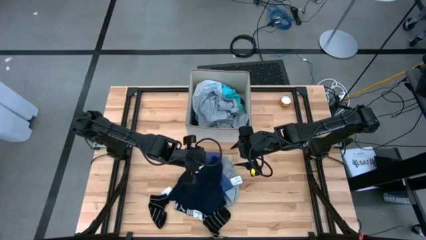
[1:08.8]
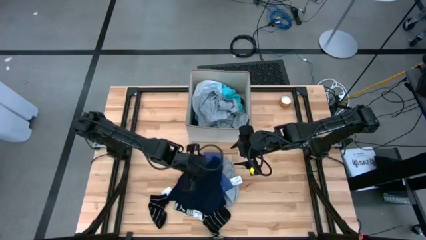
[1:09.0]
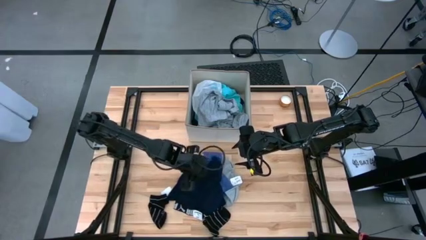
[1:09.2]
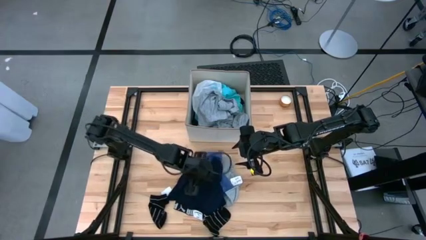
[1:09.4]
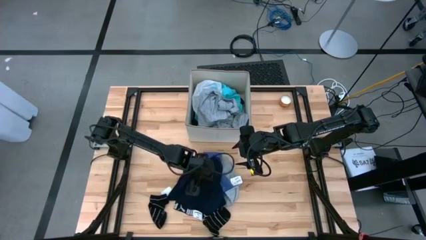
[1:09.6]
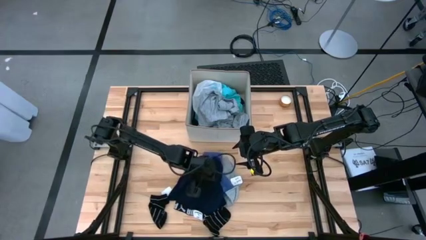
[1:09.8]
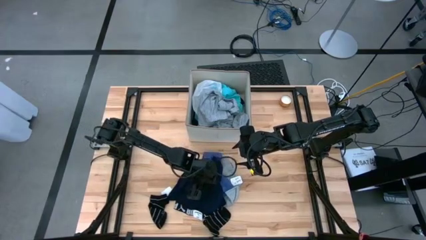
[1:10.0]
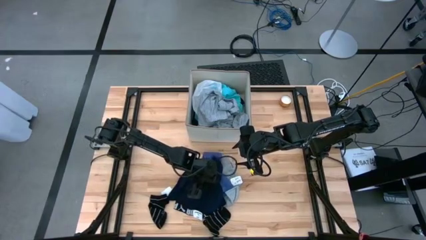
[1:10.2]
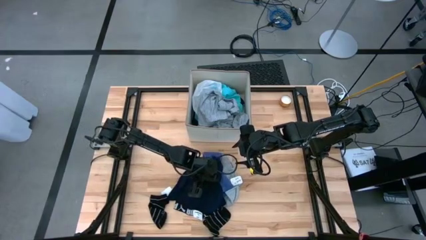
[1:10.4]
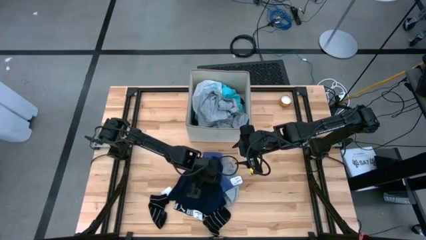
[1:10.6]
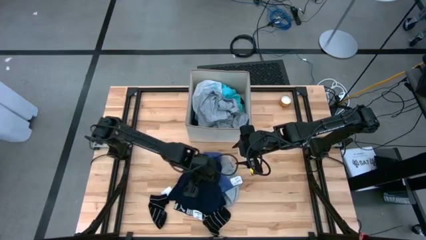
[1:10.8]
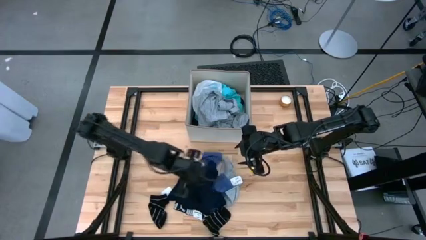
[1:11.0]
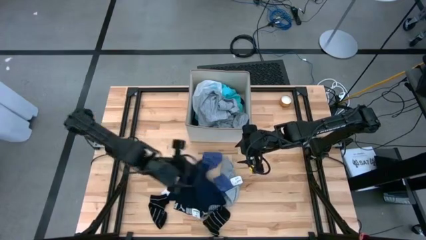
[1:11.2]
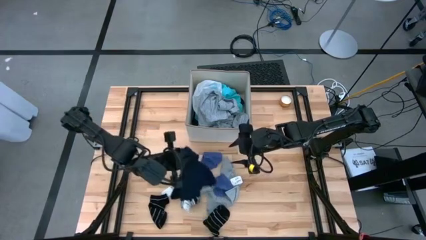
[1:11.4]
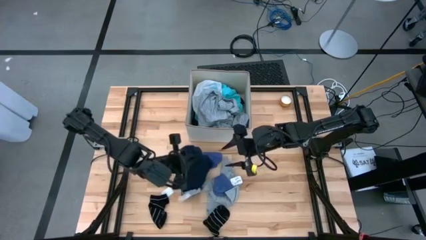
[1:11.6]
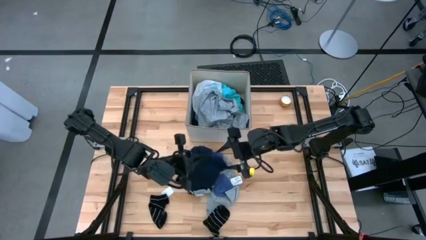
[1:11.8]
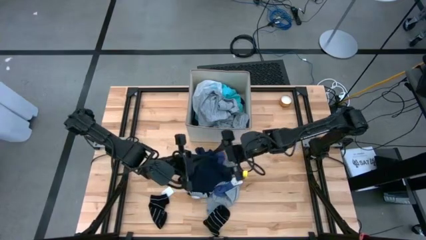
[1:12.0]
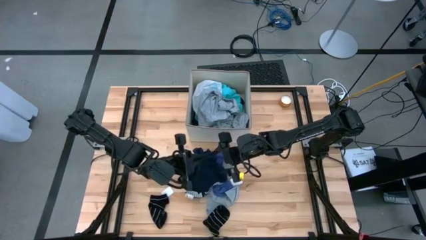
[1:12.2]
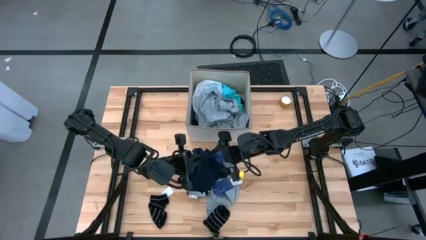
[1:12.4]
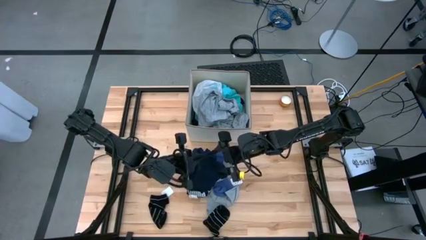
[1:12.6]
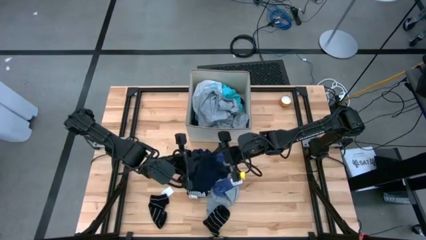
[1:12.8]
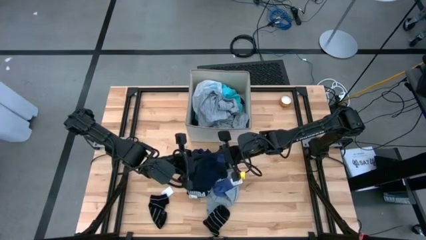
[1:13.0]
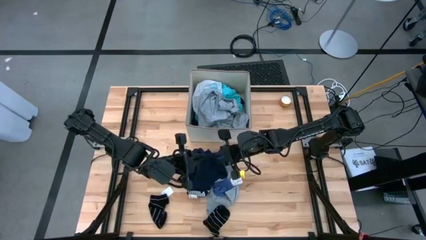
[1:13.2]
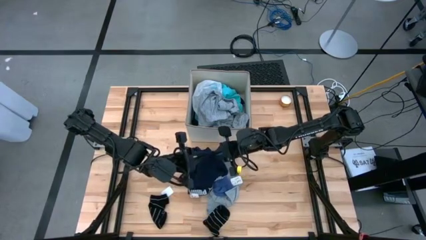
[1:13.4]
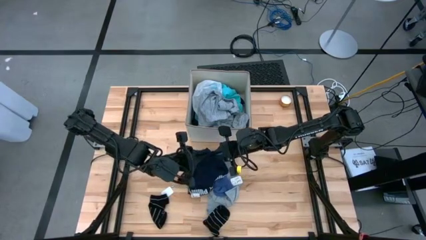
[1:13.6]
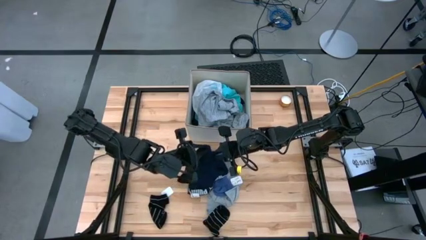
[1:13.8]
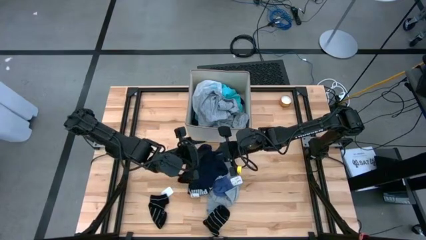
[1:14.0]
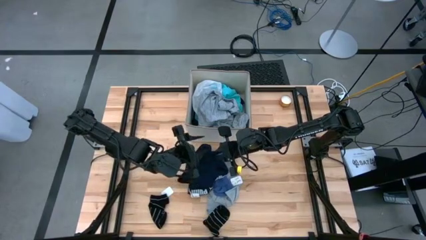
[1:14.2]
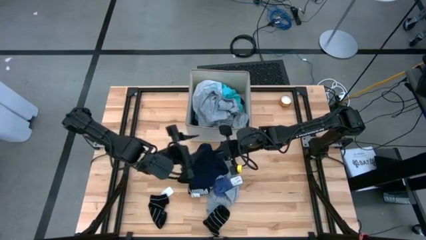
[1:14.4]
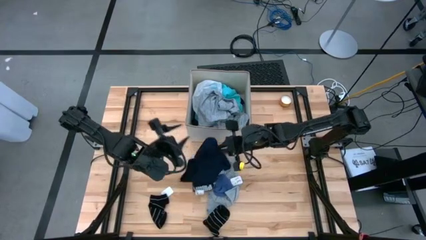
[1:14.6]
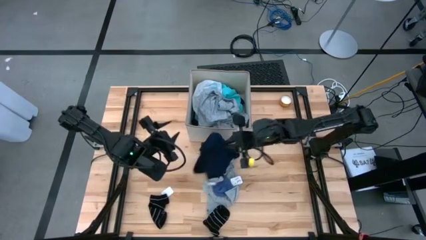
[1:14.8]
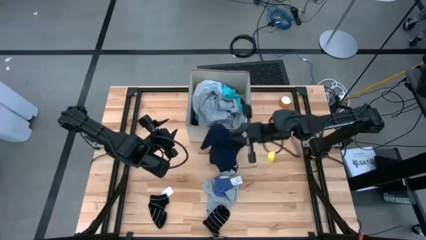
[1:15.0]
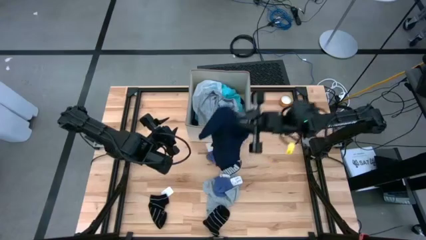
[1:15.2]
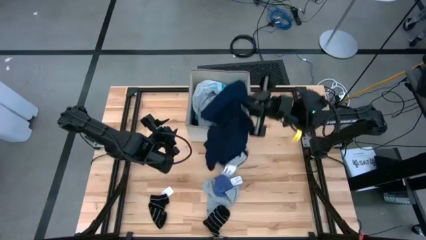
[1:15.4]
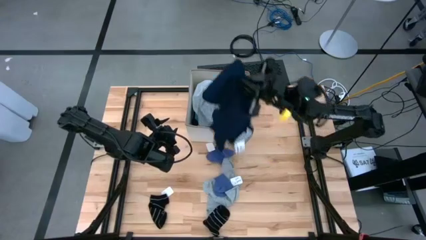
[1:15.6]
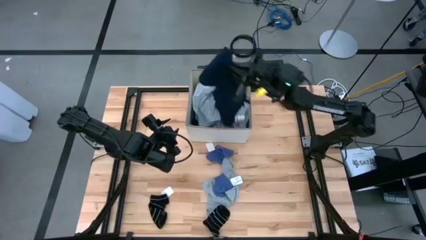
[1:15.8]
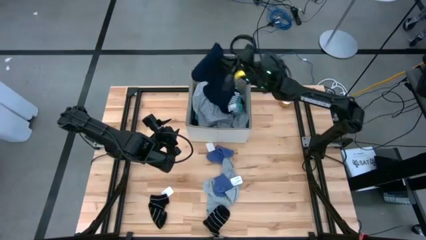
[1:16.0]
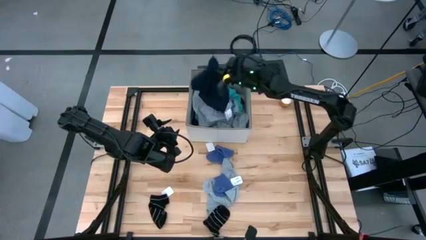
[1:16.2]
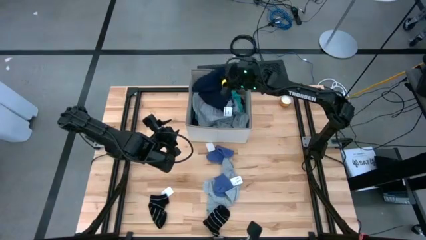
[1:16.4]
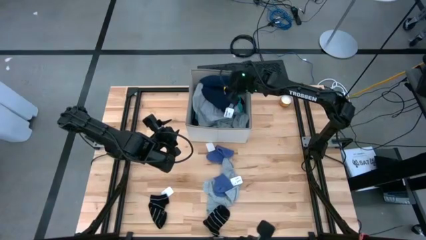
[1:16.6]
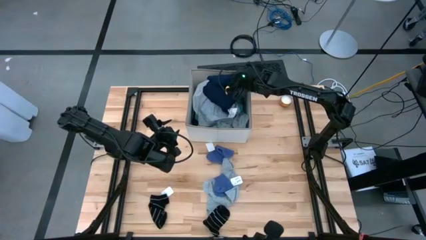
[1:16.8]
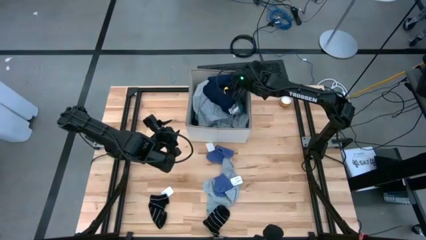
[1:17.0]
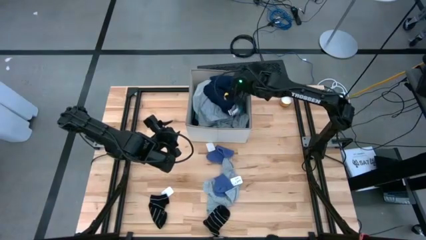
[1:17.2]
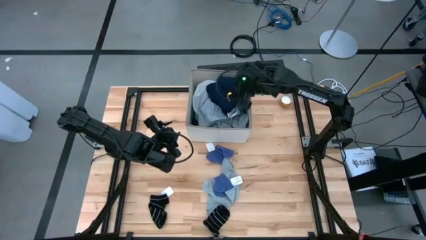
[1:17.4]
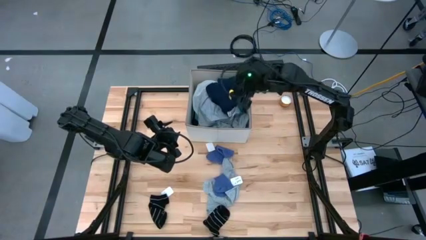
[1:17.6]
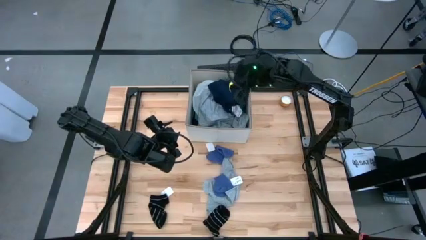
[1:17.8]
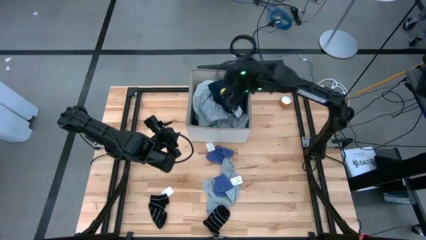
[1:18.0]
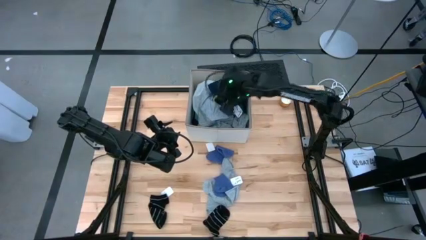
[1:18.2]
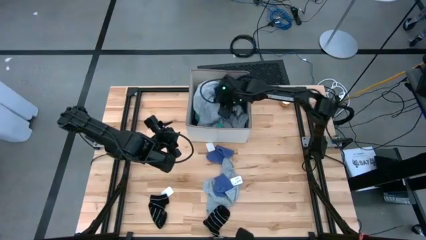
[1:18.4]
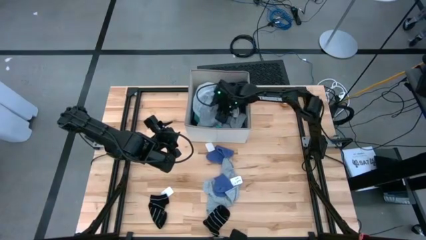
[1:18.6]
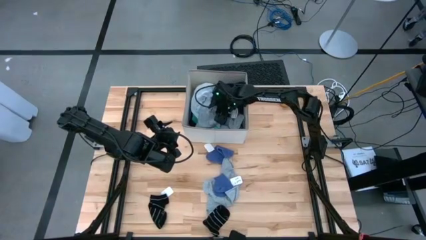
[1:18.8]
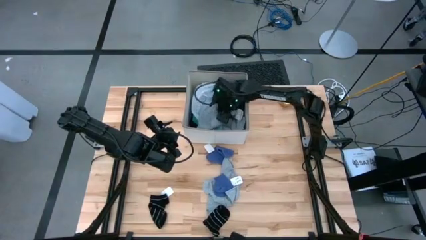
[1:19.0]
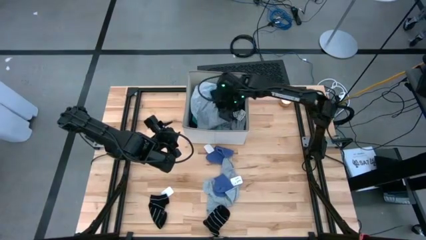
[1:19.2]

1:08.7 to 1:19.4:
Task: Sort clothes
Put the blue boxer into the laundry bin

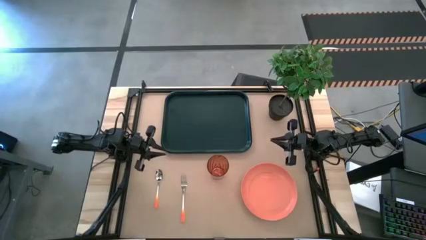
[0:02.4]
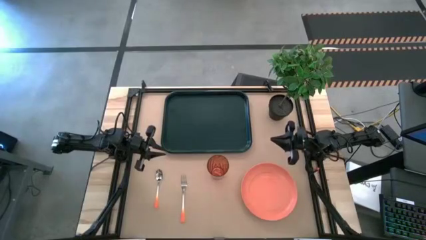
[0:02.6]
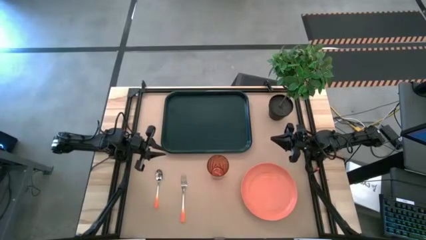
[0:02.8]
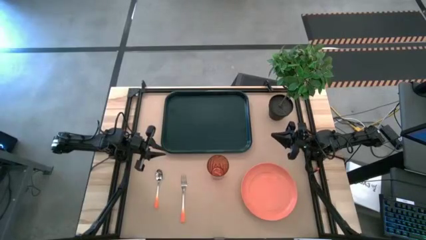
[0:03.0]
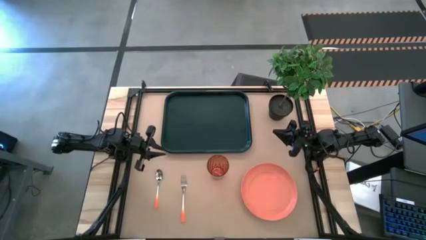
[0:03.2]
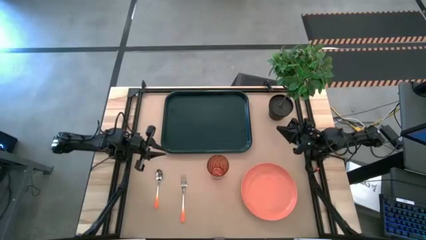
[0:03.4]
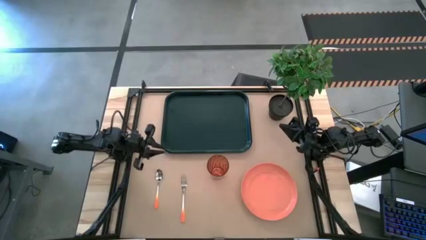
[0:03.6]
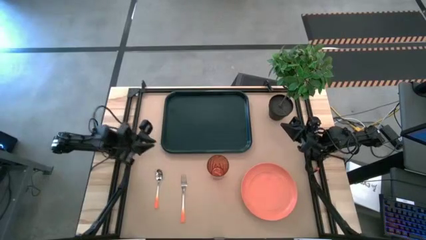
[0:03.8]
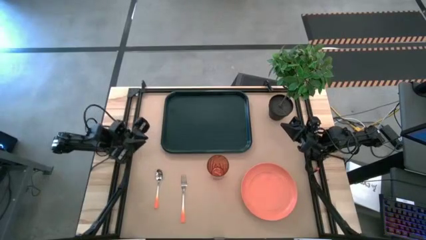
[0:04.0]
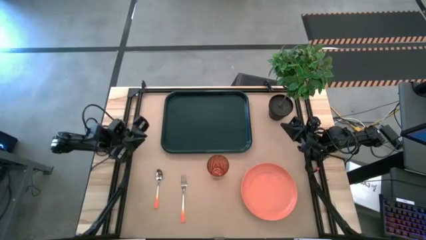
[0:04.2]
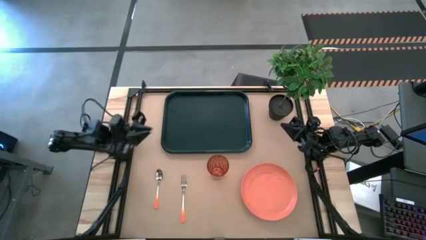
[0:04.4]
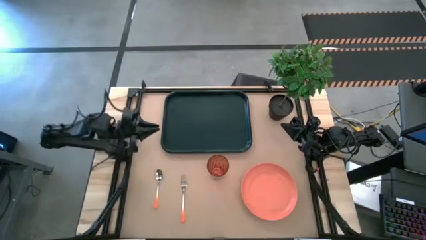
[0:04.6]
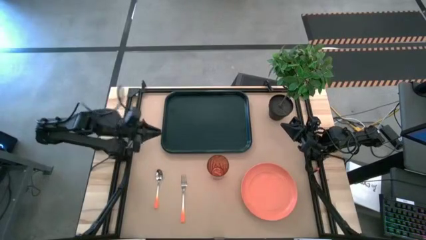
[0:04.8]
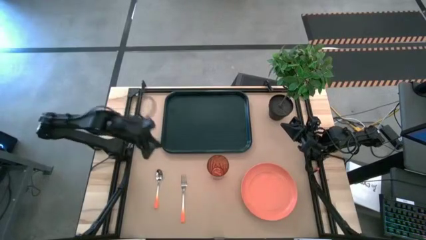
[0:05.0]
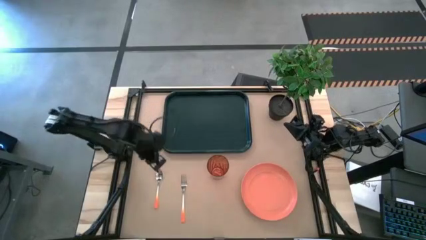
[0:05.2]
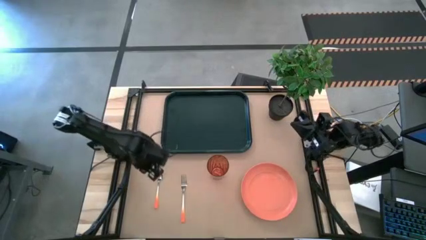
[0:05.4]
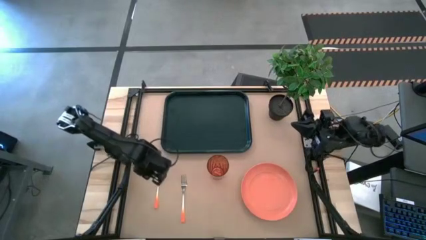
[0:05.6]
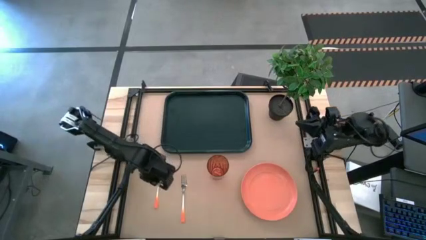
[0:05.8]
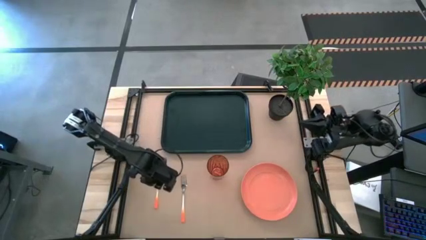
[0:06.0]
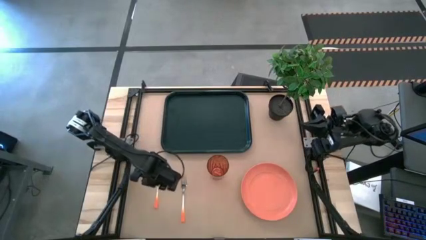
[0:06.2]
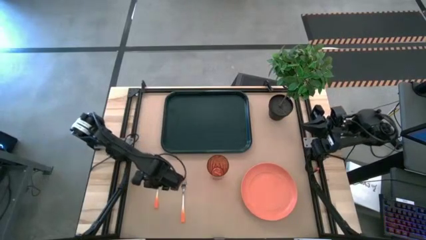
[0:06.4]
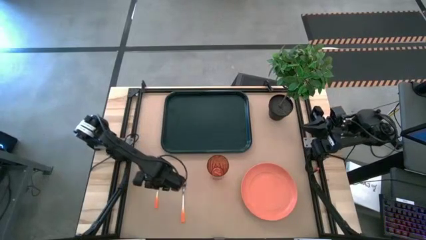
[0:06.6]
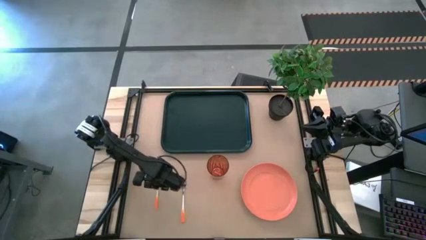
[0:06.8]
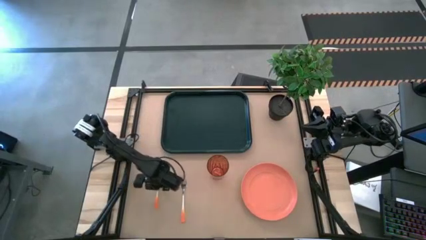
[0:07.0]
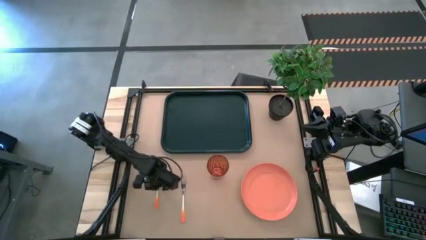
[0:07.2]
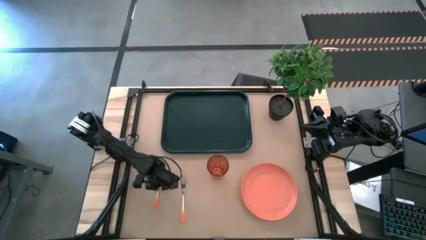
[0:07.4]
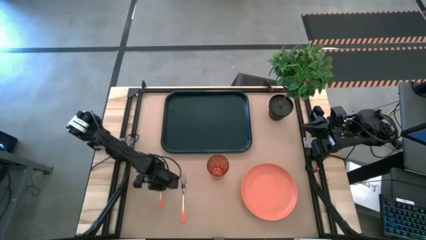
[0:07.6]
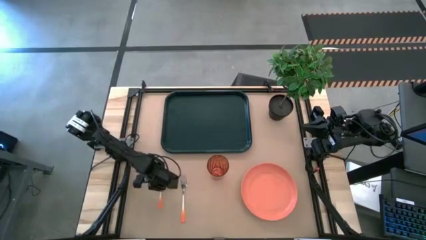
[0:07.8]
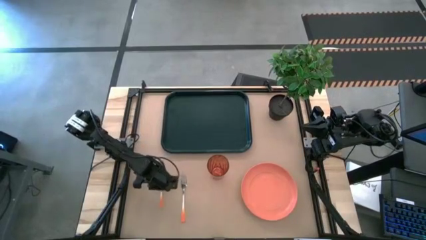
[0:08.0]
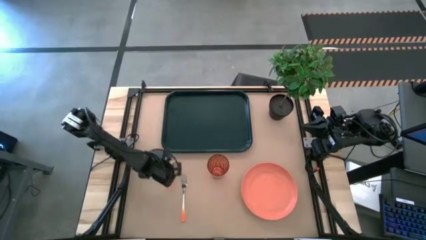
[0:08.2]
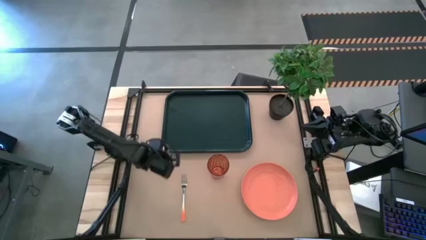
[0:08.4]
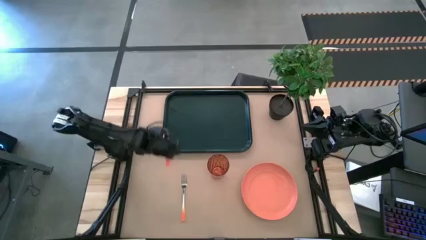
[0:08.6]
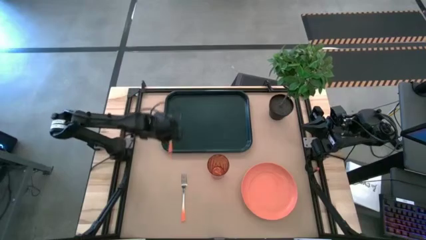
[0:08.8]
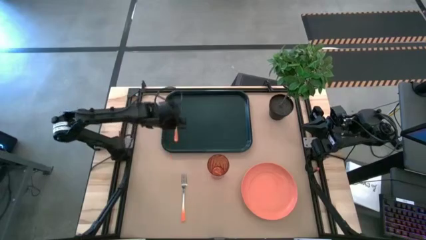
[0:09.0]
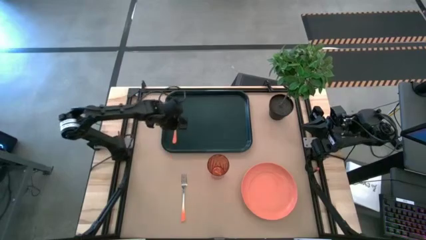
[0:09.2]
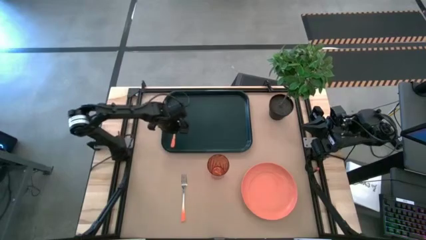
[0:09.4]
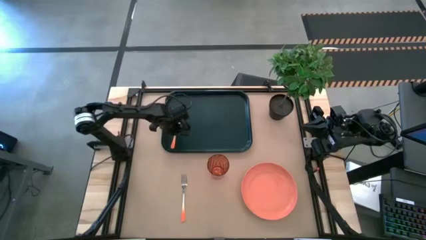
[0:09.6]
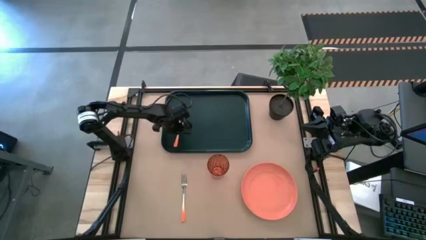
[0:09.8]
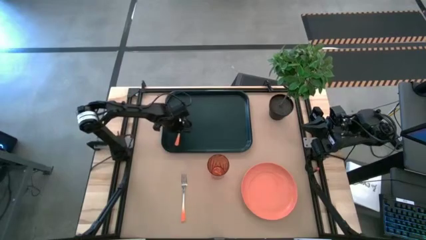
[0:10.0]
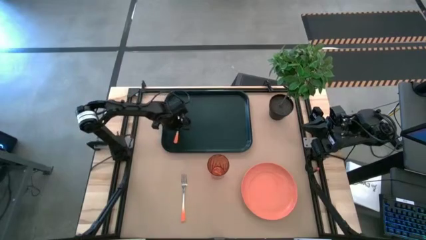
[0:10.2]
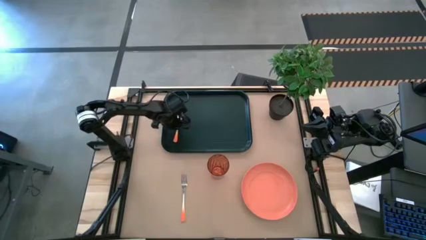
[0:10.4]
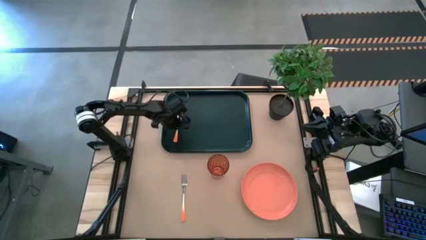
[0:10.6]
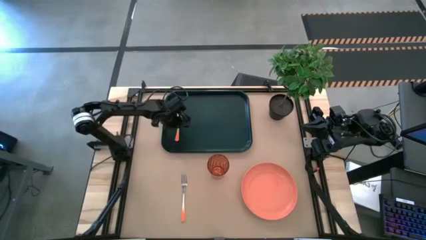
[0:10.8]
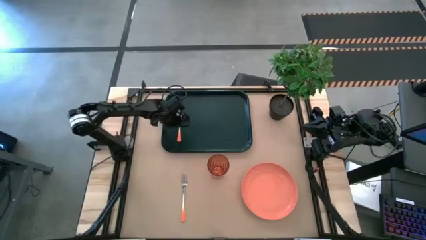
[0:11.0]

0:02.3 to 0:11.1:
Task: Pick and place plate/cup/fork/spoon on tray
Put the orange spoon on the black serving tray
